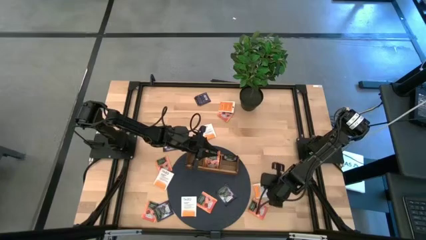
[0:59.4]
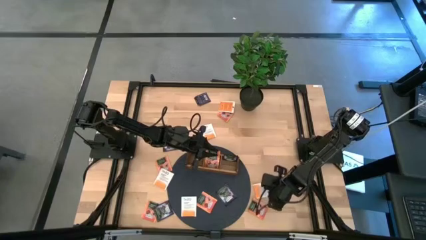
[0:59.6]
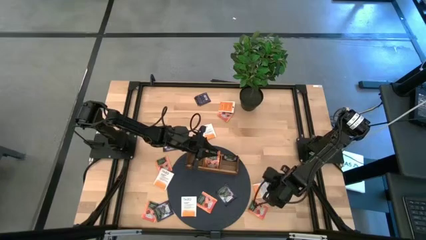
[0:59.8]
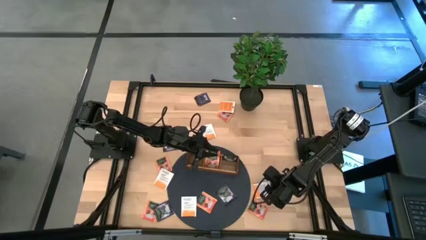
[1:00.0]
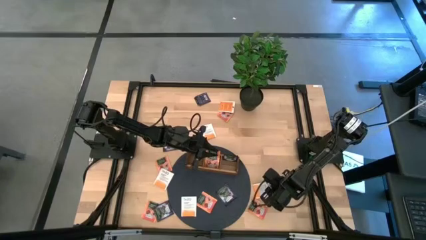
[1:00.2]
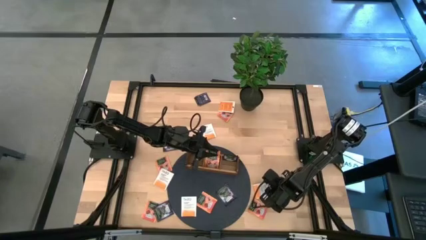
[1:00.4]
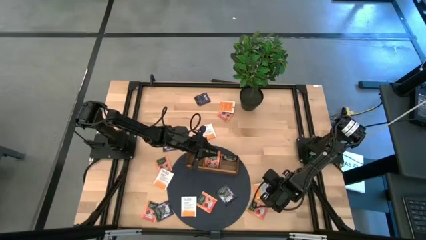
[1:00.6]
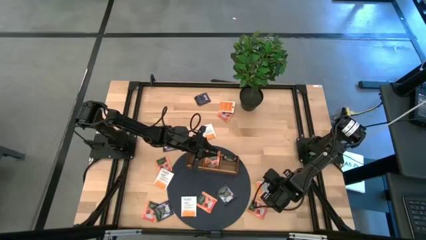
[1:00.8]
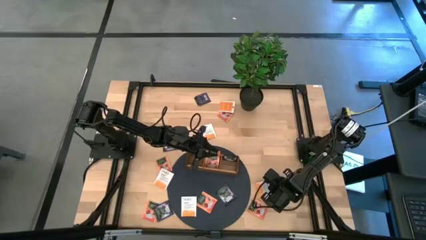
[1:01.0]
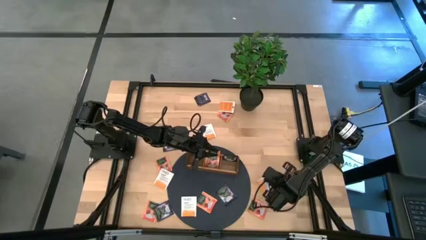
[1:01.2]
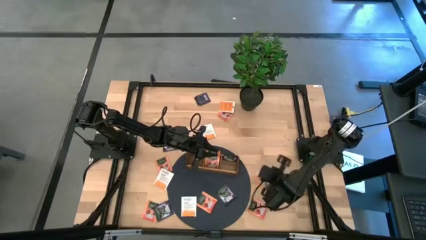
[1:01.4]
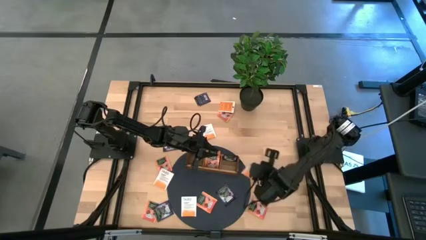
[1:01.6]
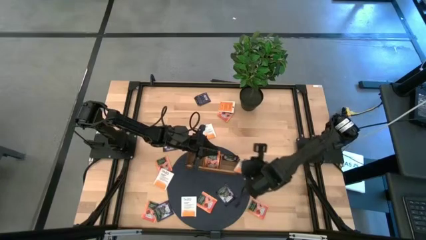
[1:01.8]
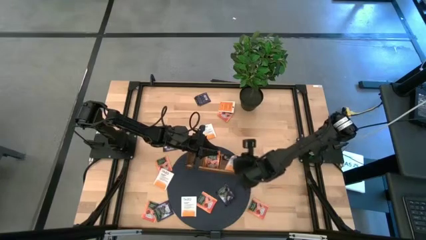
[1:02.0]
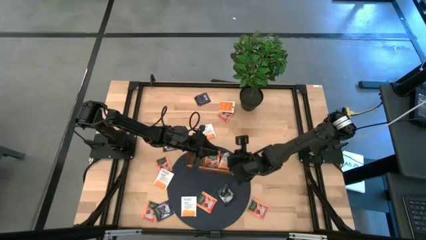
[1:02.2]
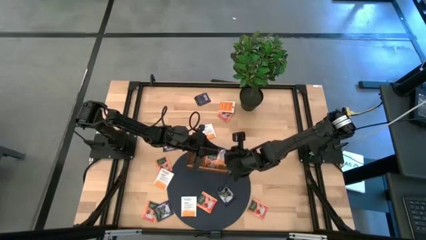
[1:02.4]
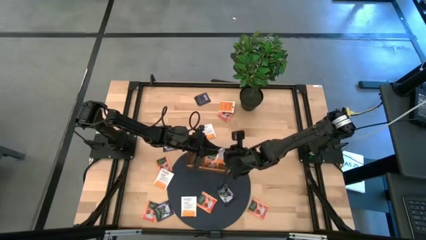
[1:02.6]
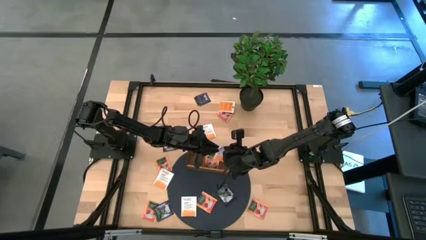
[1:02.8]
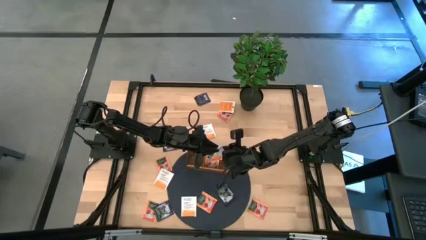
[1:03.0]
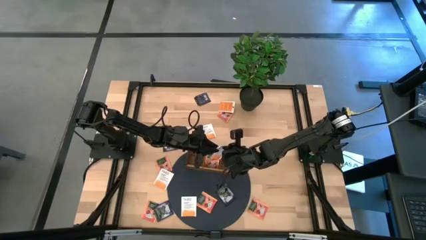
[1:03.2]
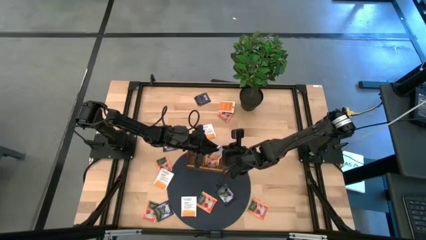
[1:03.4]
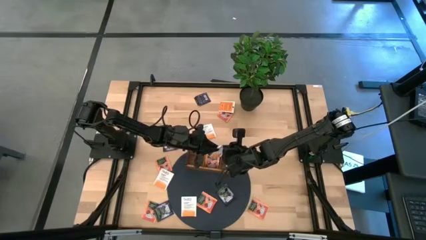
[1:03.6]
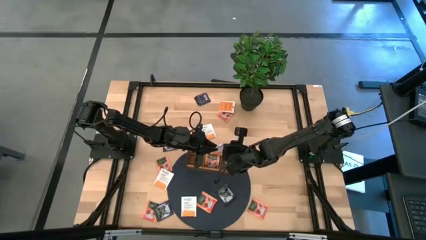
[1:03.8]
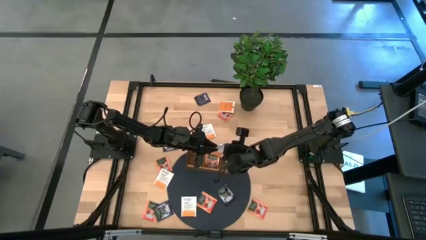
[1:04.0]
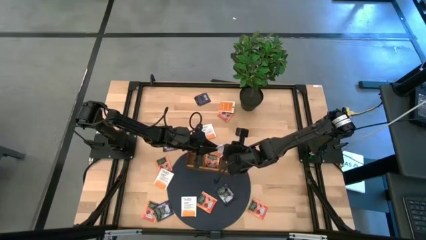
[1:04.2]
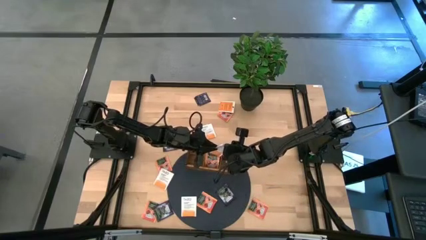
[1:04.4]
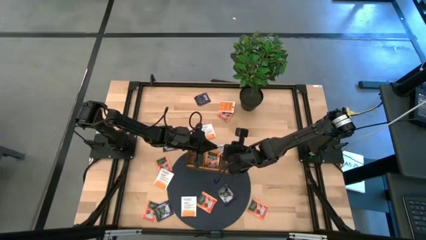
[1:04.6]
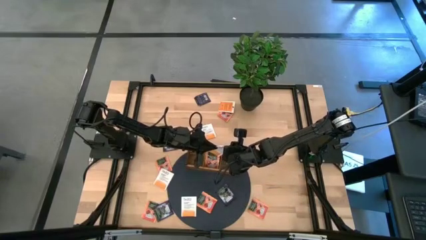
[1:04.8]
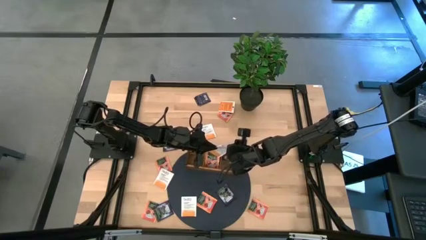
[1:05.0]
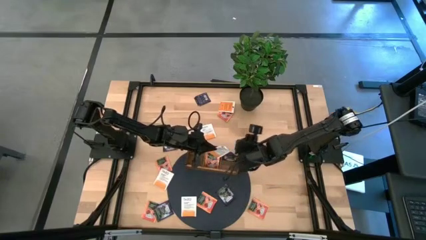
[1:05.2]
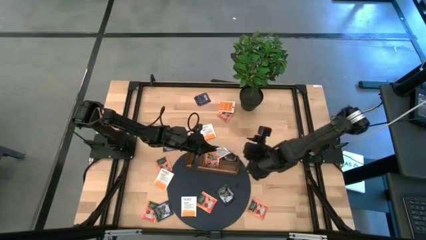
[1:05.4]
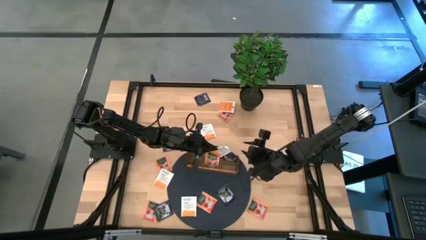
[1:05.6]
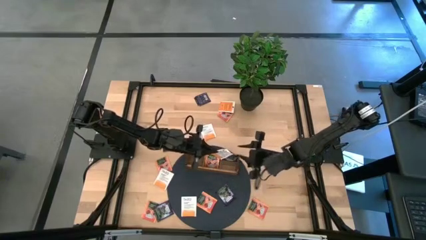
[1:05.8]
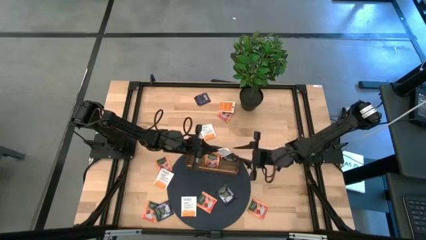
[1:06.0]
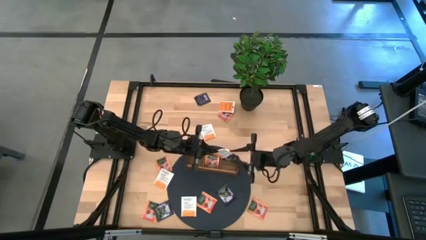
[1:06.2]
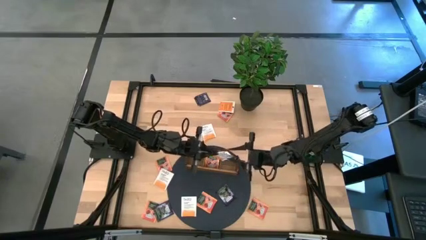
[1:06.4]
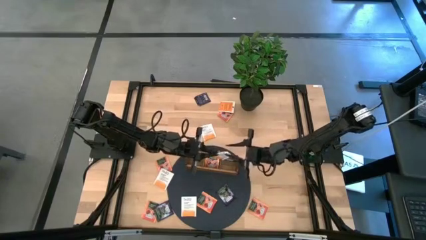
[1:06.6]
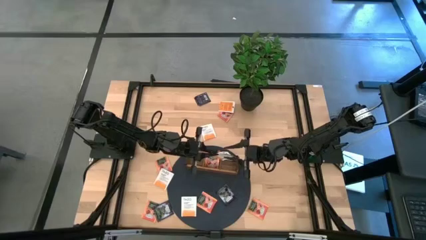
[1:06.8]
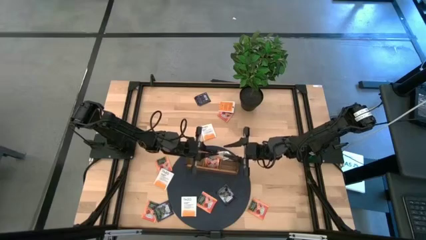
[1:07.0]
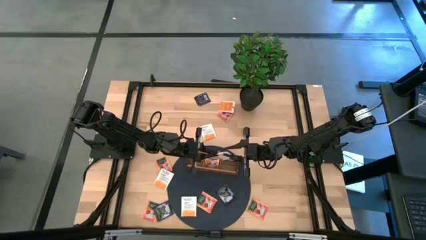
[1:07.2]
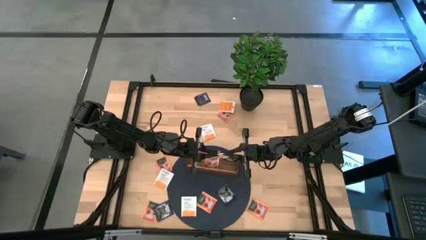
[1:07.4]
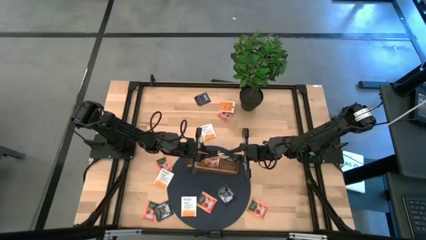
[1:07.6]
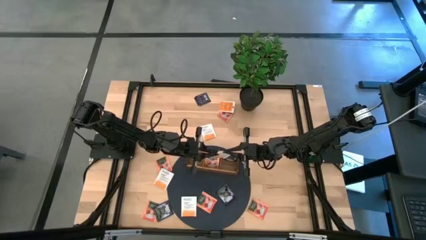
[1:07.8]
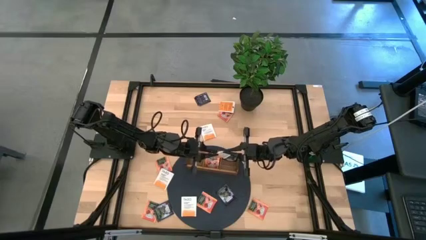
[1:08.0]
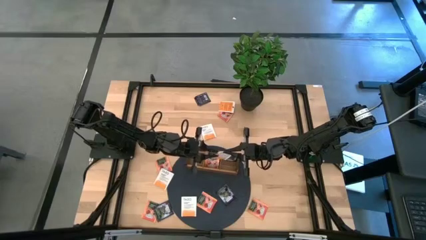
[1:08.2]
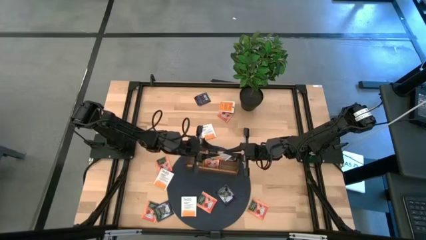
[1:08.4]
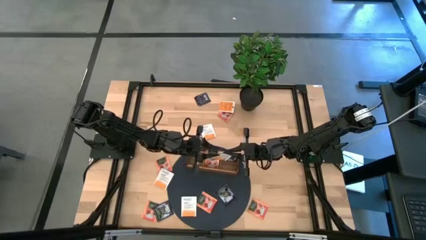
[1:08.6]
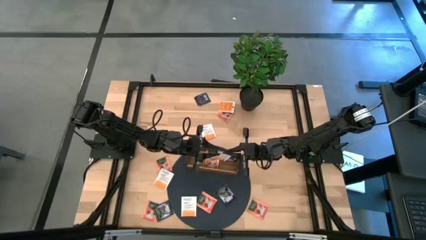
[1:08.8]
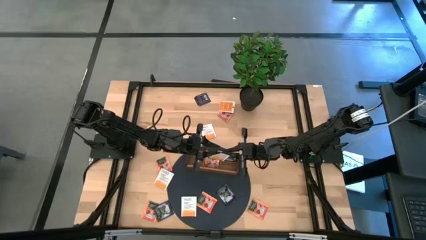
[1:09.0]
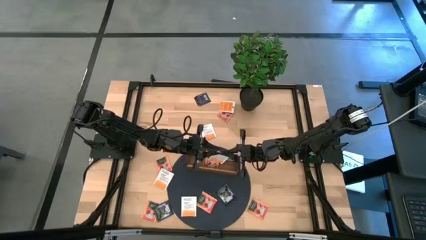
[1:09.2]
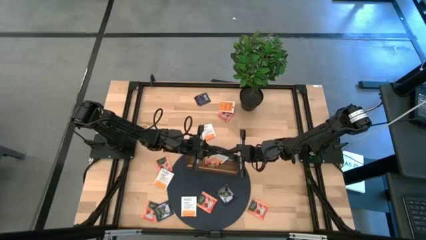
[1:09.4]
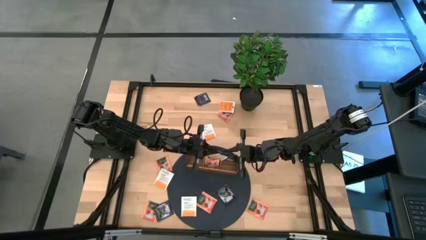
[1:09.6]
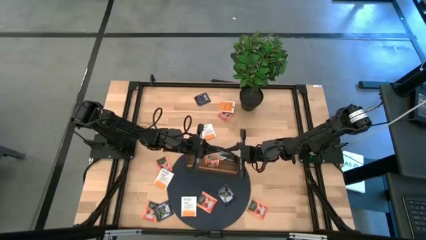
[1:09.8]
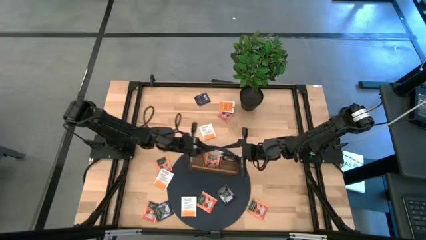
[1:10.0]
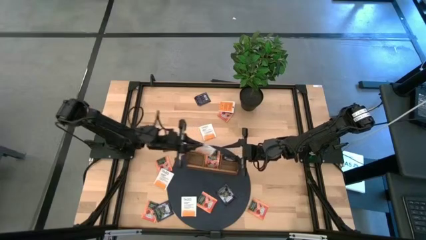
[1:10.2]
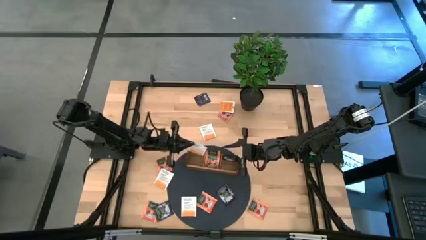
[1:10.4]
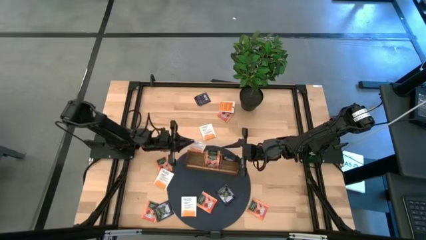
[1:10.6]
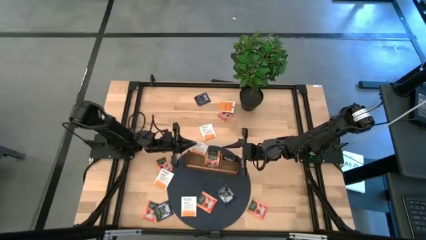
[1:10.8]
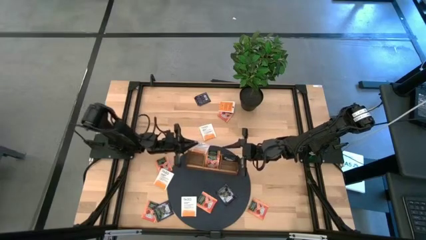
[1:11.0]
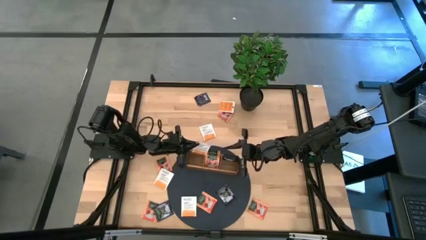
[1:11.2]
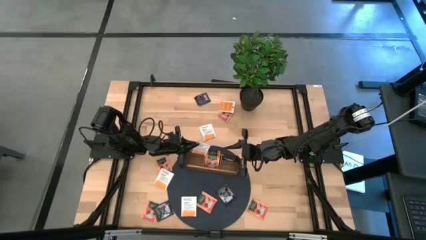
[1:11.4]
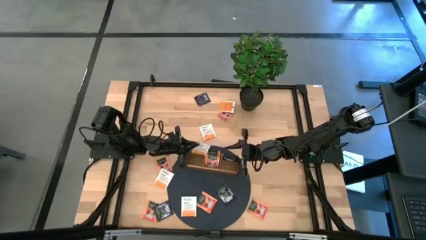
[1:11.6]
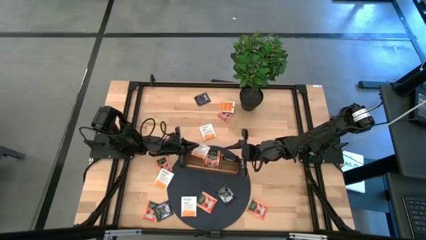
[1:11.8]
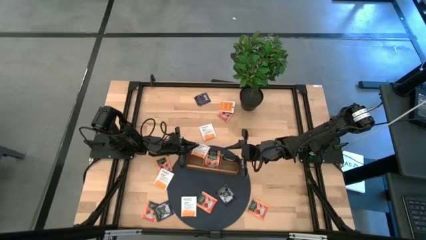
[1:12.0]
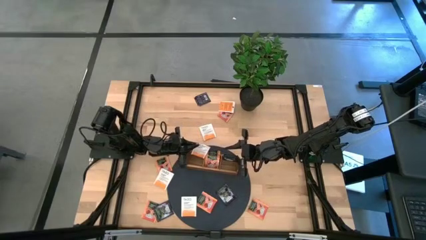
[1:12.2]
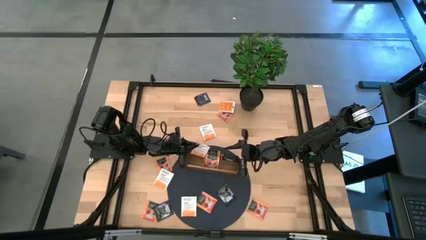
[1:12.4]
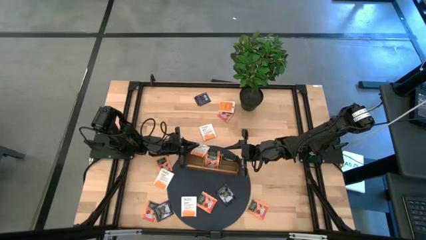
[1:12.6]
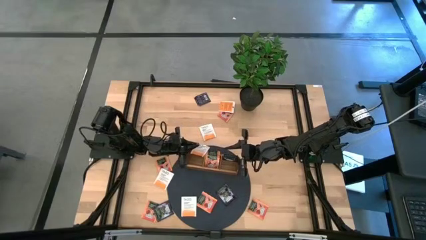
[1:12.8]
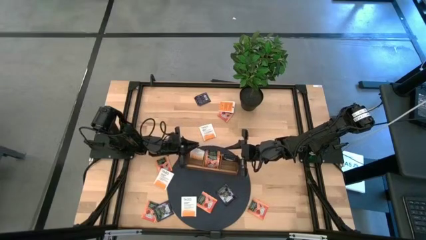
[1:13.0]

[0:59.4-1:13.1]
Task: Pick & Place Tea
Put the white orange tea bag into the left section of the wooden organizer

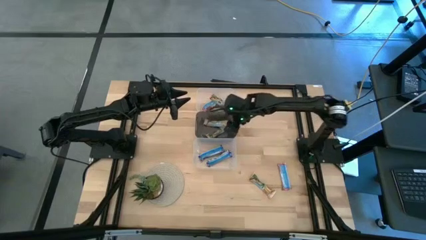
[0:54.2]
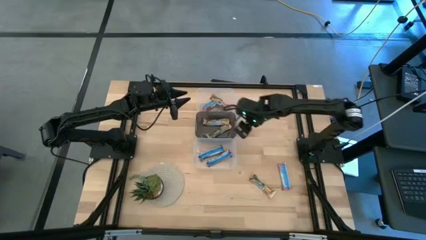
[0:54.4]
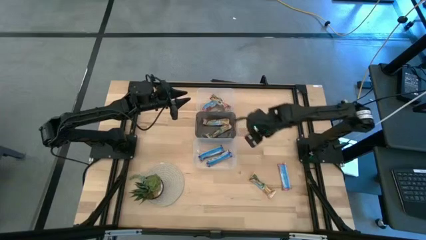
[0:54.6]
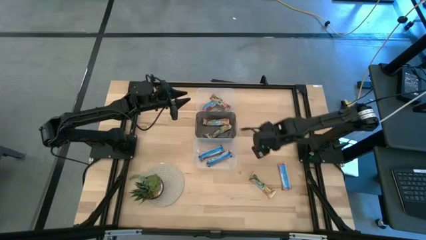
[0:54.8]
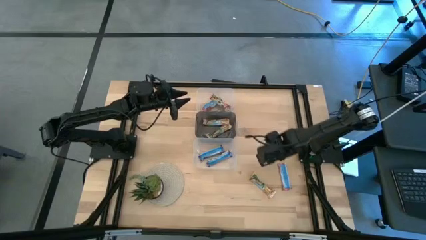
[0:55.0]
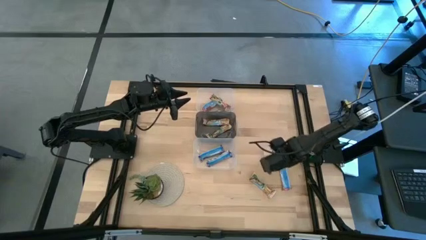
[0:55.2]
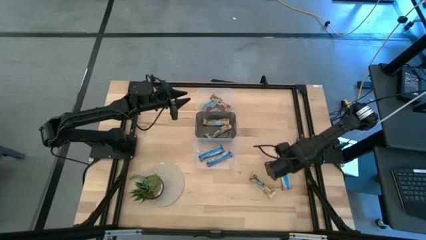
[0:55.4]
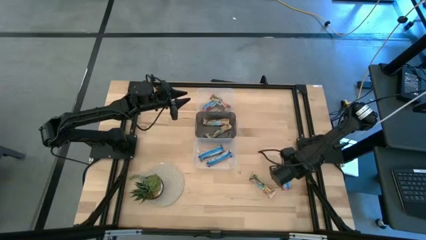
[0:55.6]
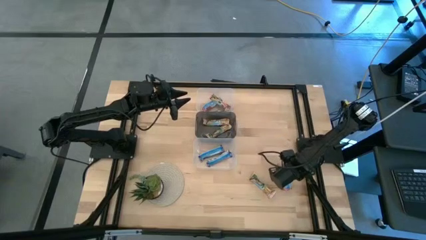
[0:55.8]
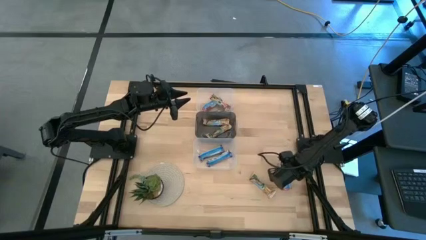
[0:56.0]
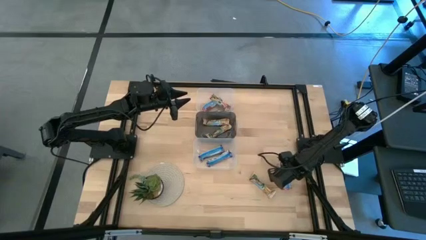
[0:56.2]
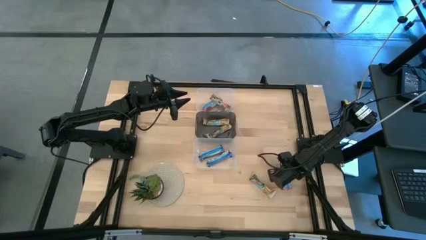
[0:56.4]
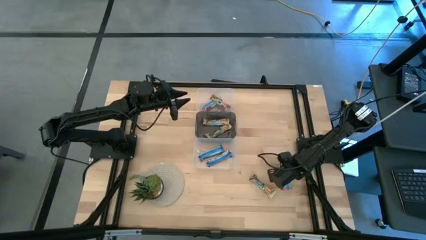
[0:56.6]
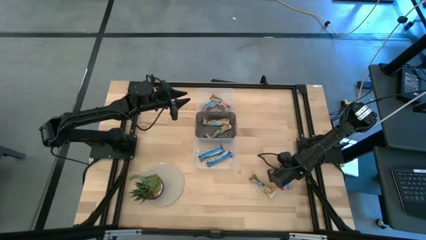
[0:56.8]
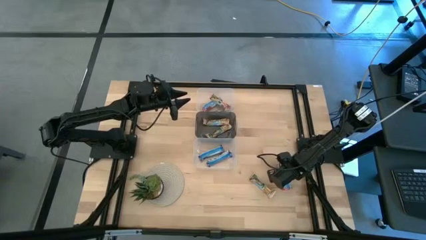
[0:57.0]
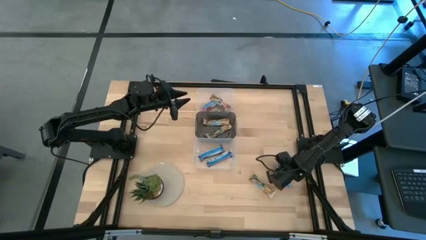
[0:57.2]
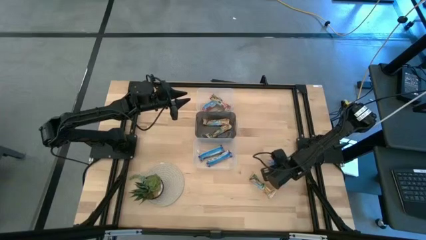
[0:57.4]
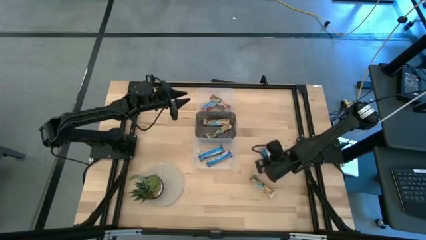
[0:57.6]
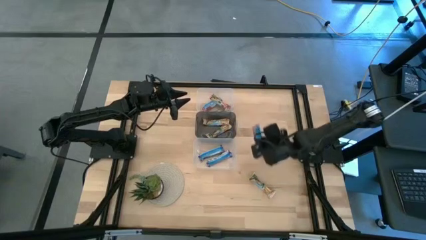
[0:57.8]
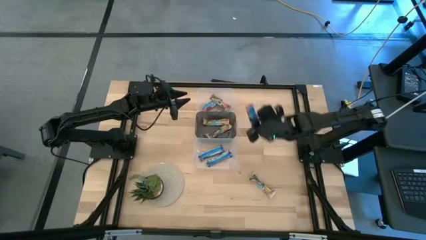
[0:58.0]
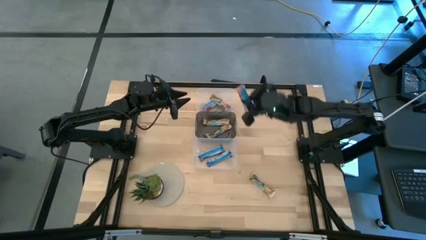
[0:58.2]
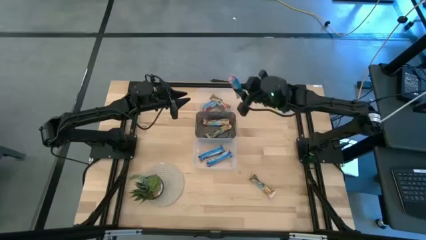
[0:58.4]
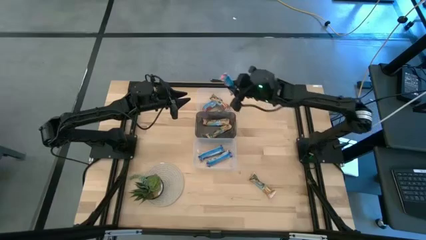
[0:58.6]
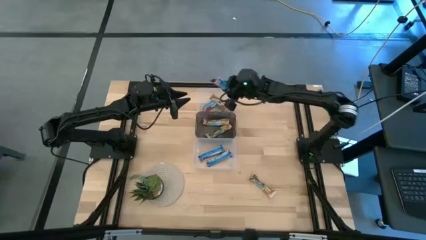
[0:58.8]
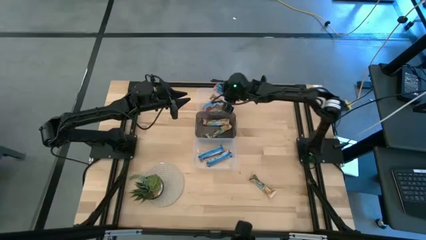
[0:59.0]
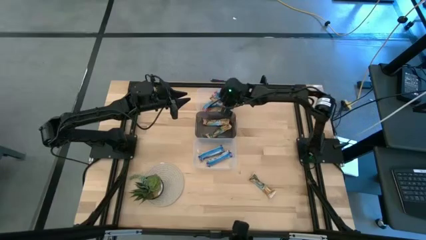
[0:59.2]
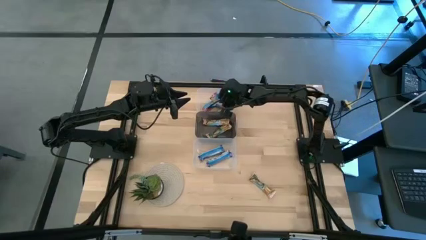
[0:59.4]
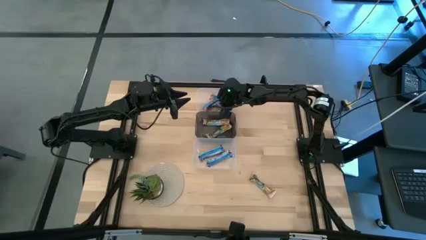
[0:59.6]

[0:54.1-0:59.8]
Task: Pick and place Granola Bars by type
Put the red granola bar into the top transparent bin
